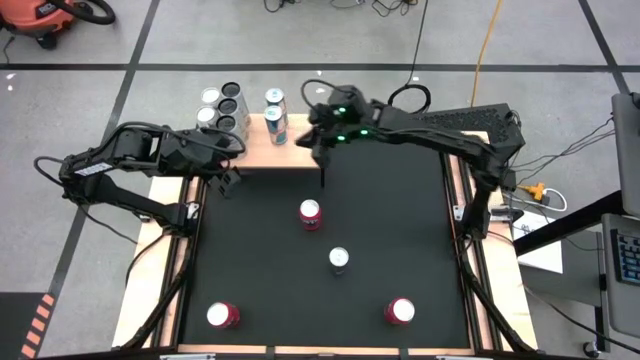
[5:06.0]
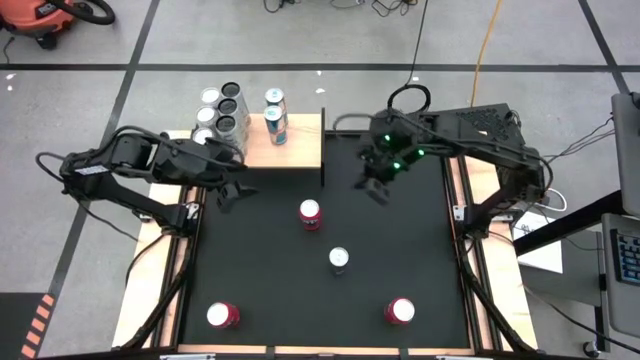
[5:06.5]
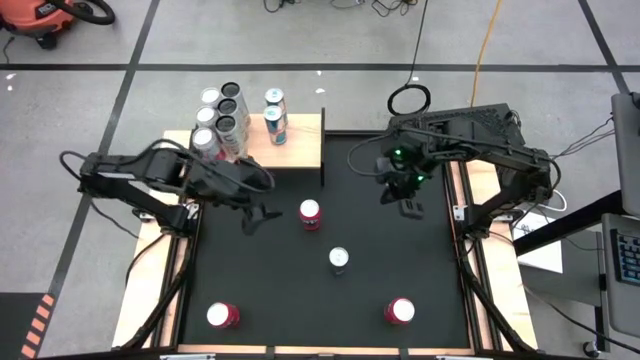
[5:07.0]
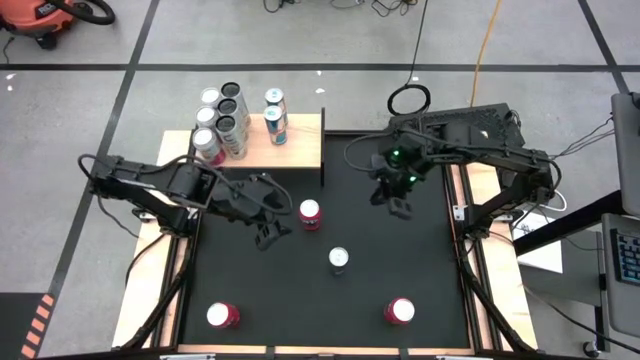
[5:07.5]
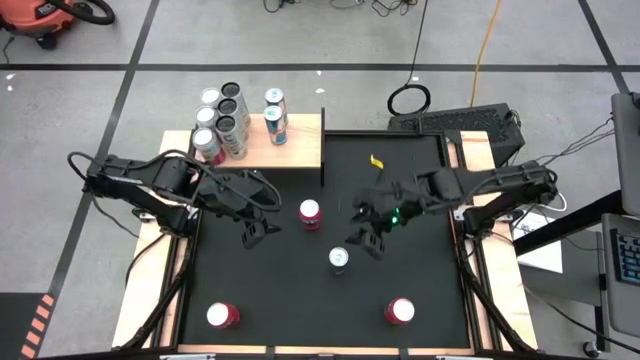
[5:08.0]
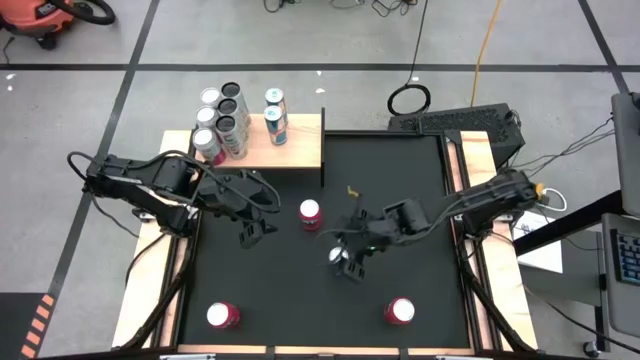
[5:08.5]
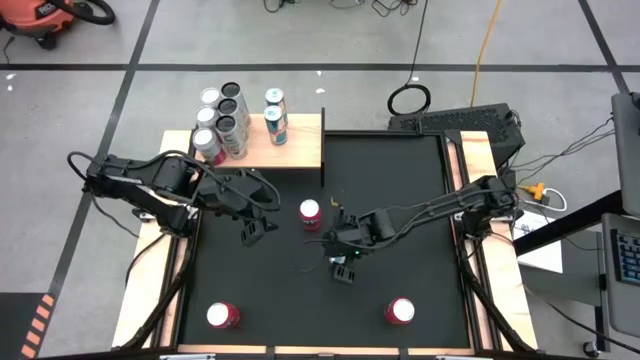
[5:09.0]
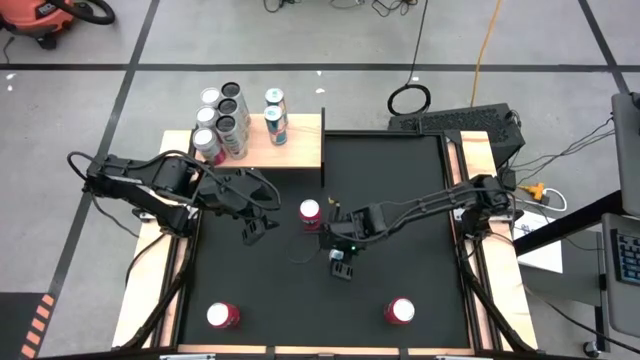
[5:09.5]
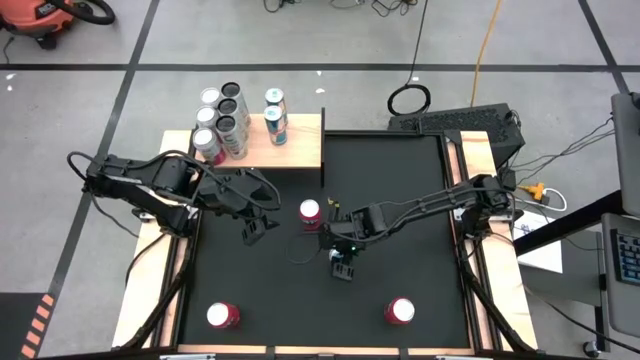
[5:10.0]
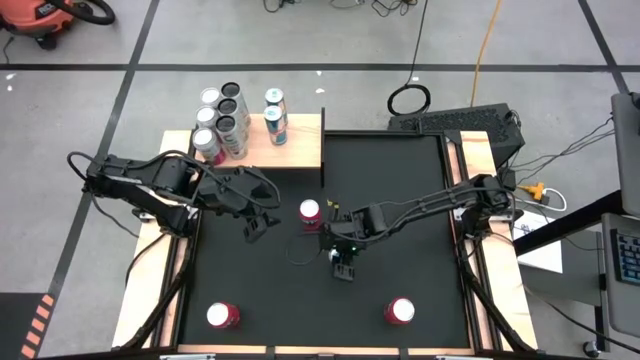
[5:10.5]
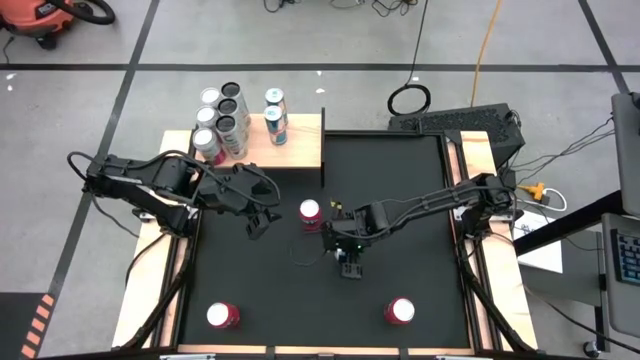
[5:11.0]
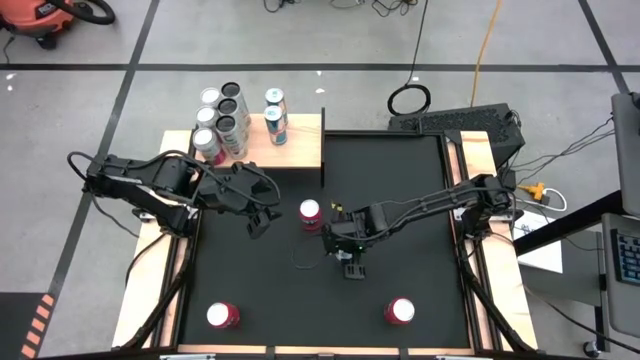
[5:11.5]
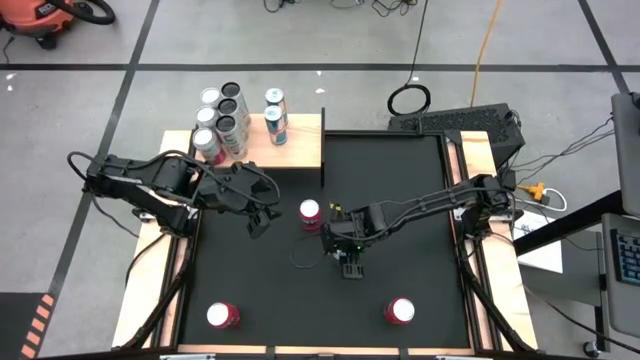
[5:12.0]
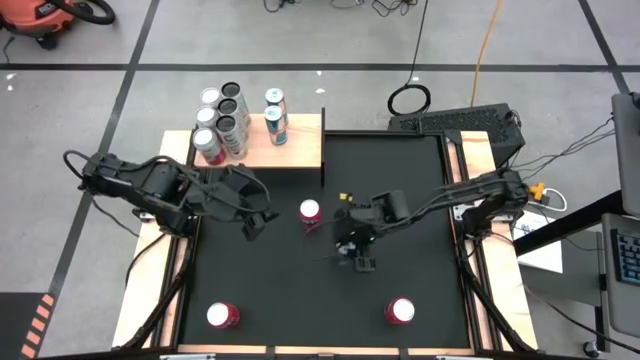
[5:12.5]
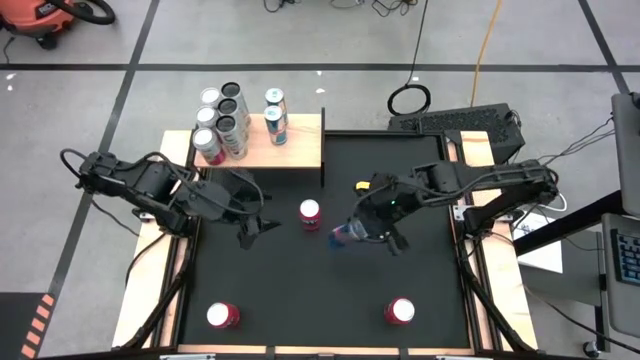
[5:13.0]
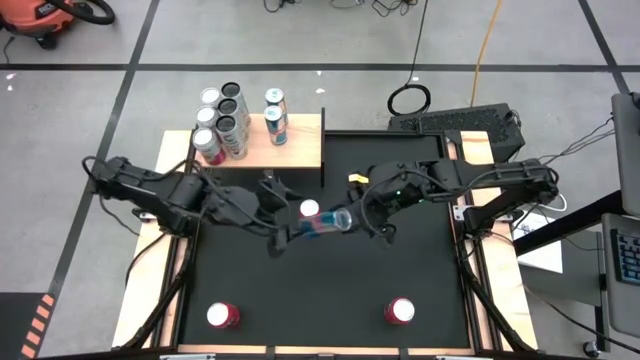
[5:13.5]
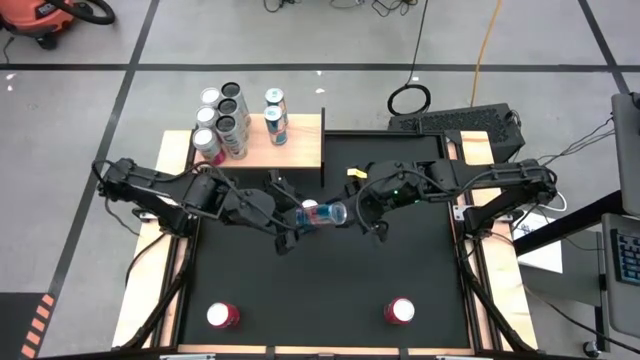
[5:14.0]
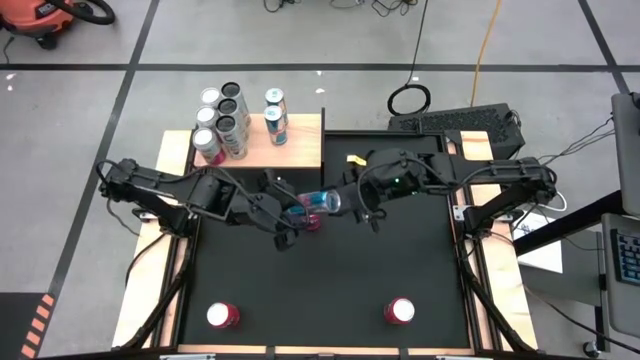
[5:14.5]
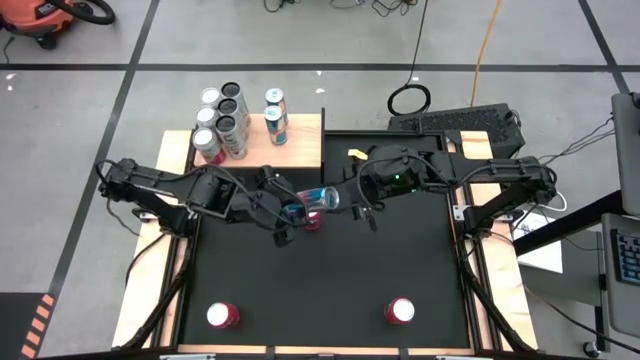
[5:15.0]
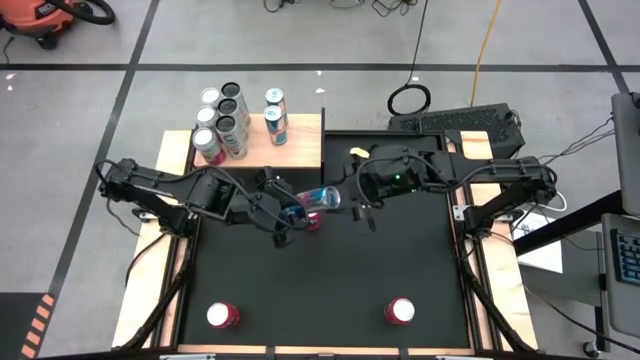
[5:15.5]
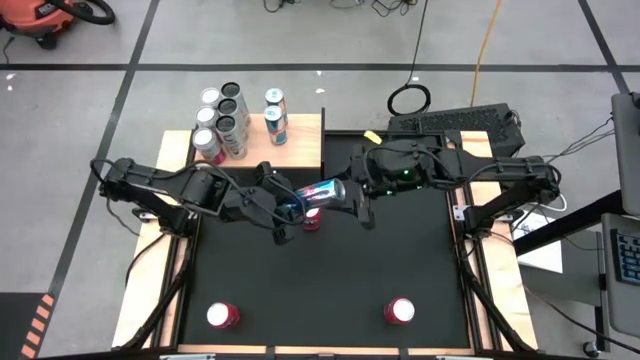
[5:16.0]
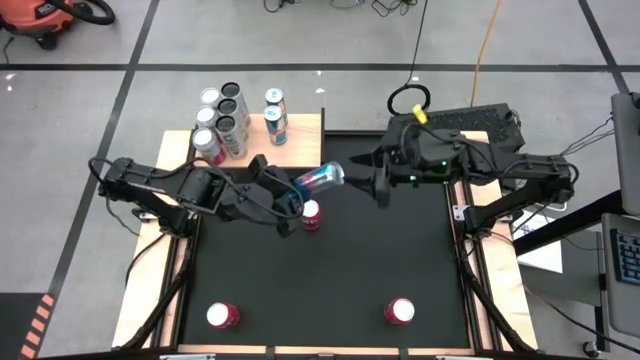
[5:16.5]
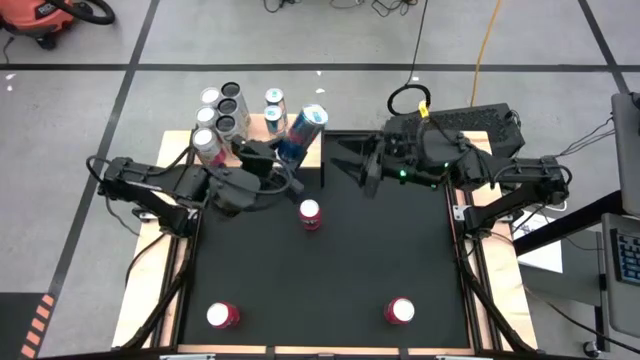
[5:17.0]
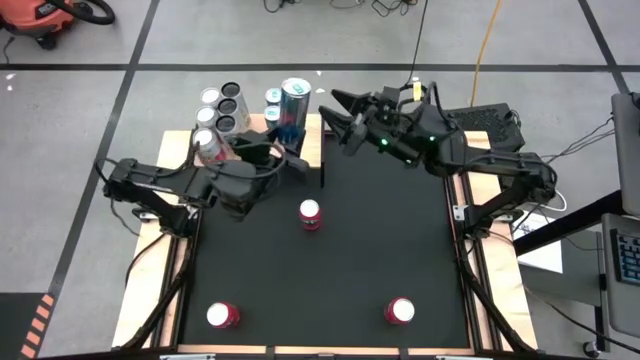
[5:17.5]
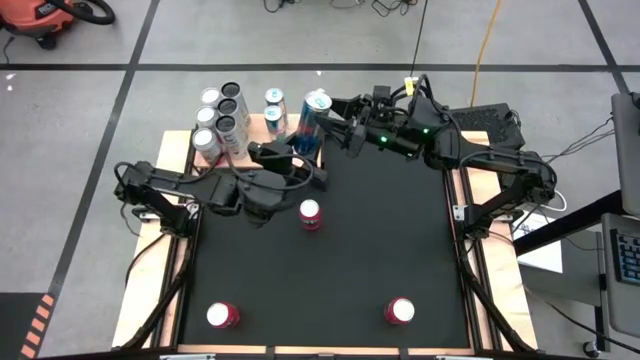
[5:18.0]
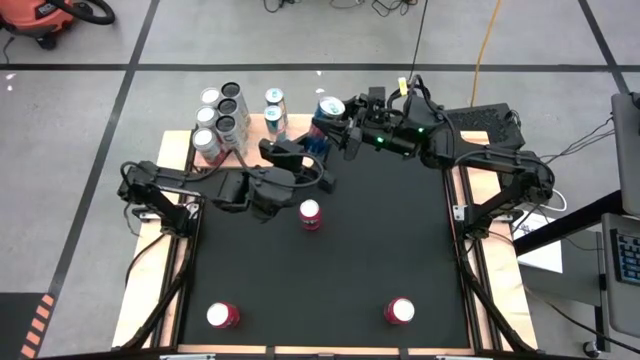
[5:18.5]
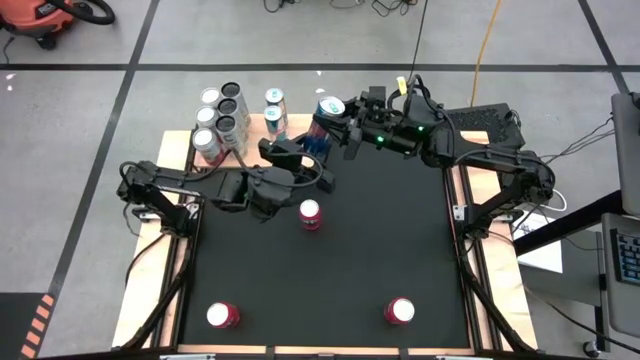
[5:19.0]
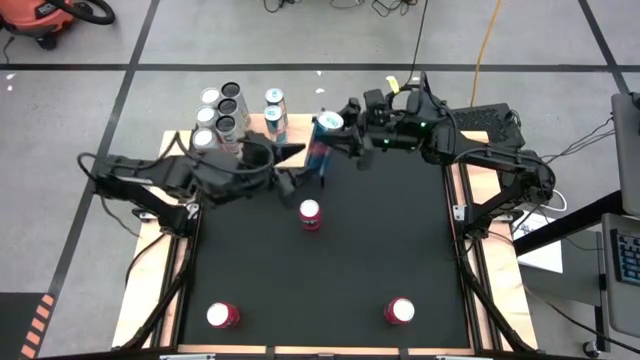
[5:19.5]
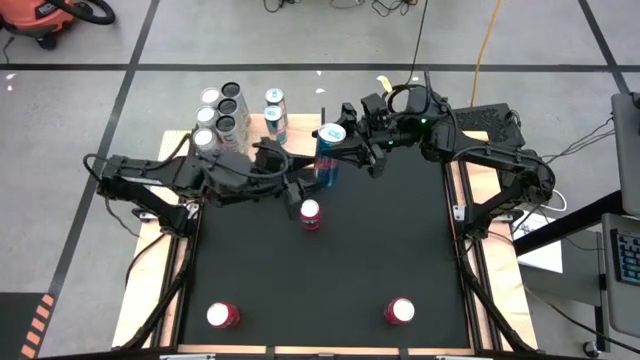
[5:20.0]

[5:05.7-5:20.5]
Task: Place canned beverage on shelf
Put the blue soda can on the shelf aligned with the other blue soda cans

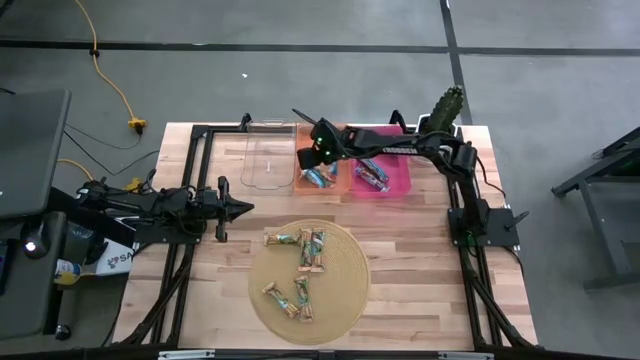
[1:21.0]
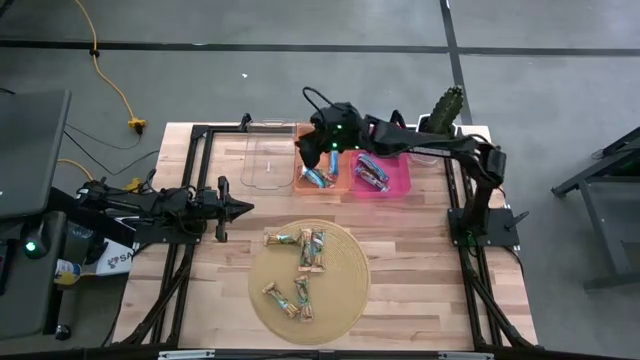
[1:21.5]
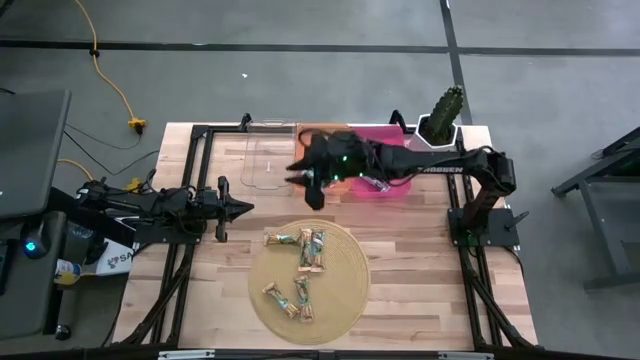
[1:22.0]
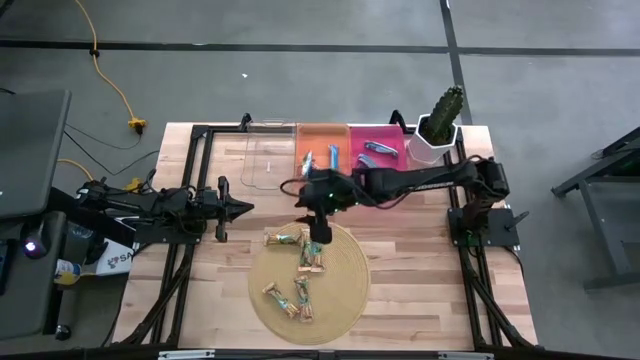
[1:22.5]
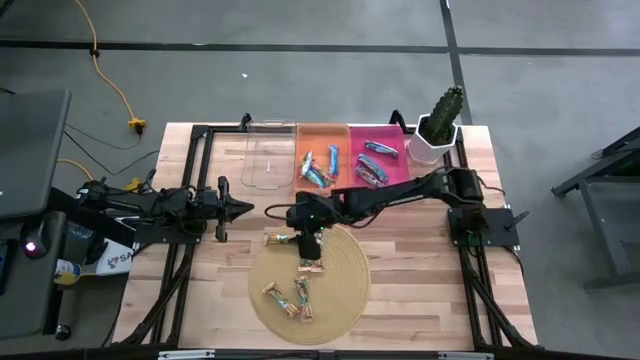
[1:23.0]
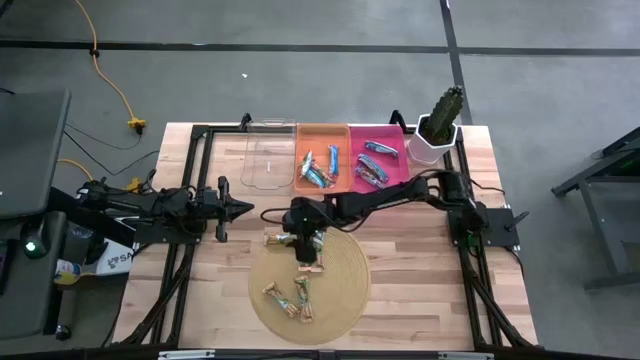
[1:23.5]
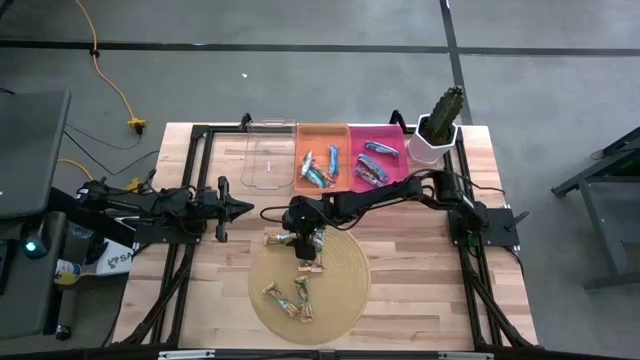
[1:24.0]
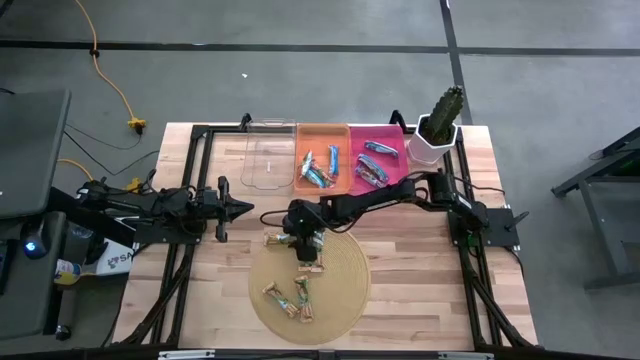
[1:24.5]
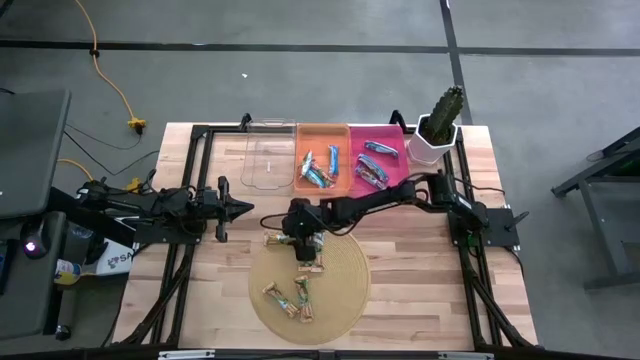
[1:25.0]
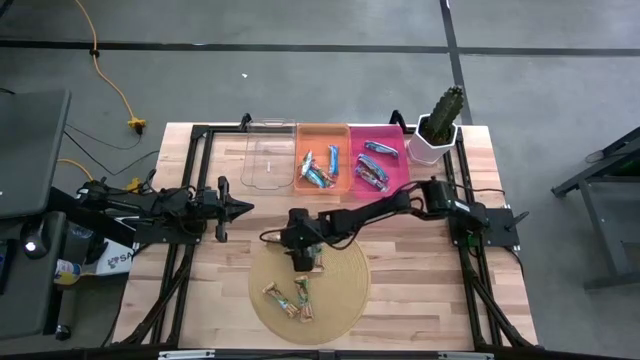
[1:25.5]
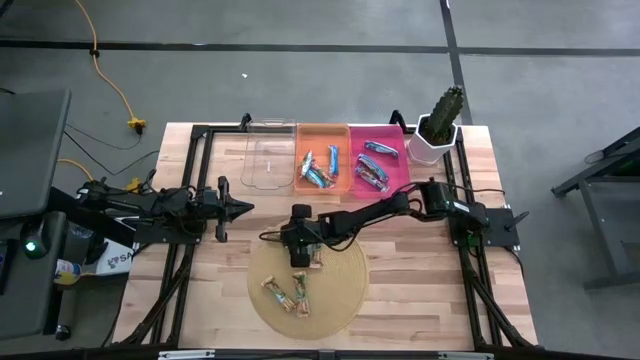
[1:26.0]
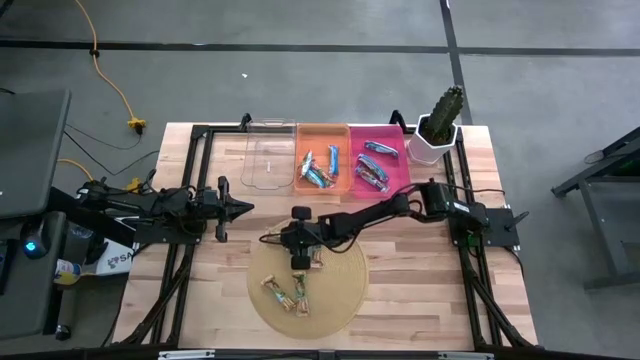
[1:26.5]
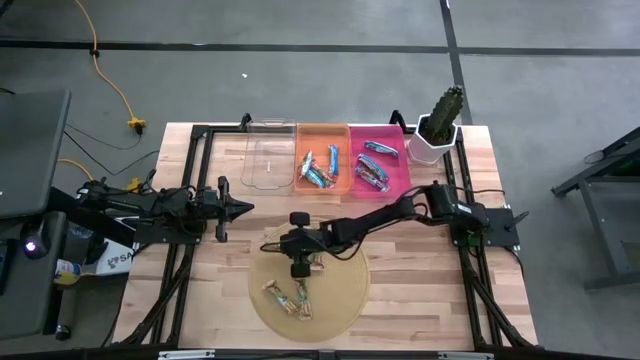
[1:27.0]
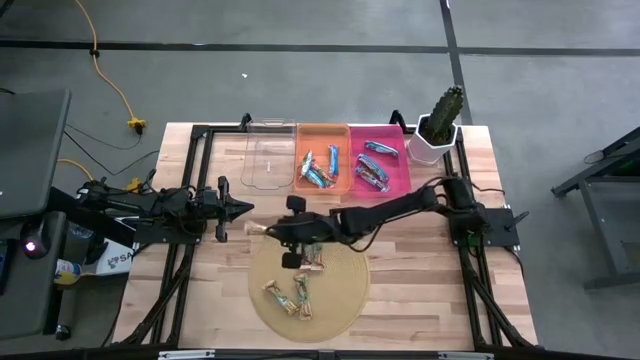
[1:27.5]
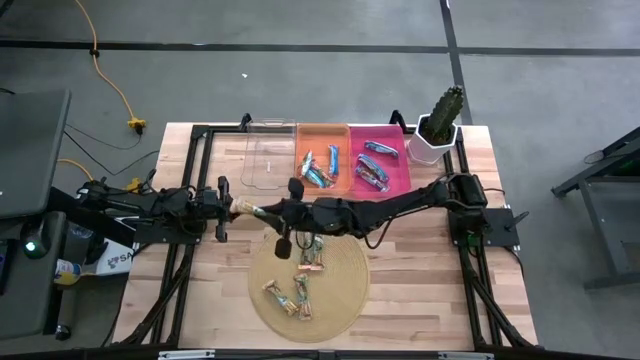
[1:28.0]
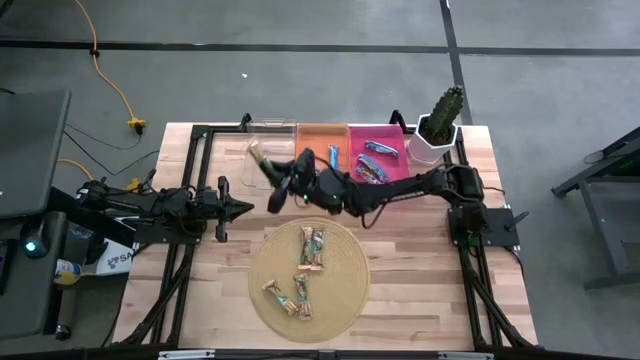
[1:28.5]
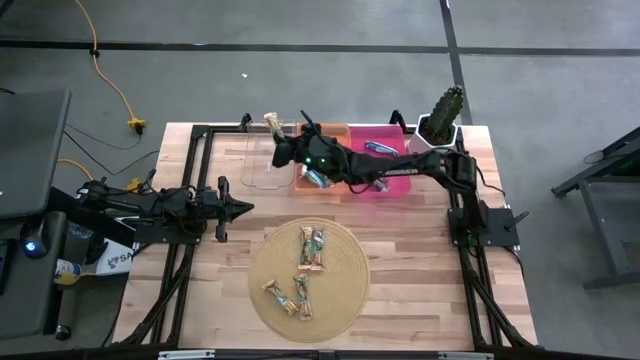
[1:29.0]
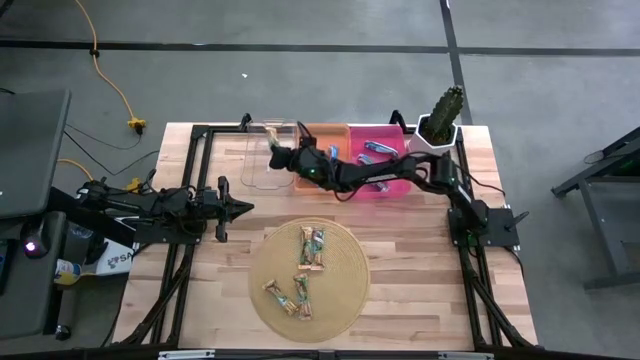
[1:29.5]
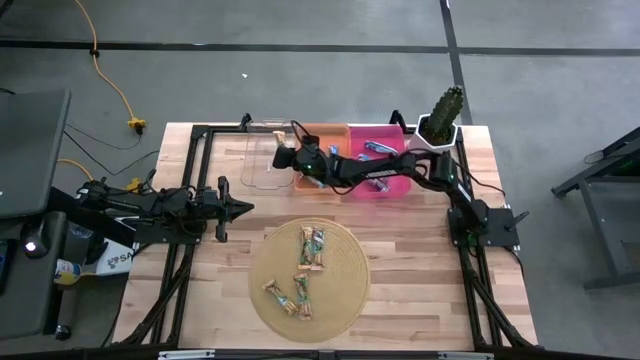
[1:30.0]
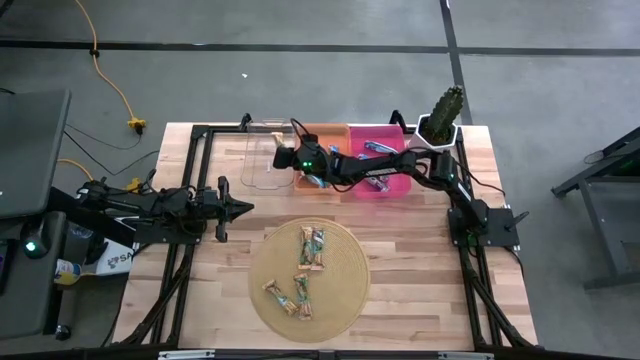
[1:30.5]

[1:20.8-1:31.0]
Task: Pick and place Granola Bars by type
Put the yellow granola bar into the transparent bin
